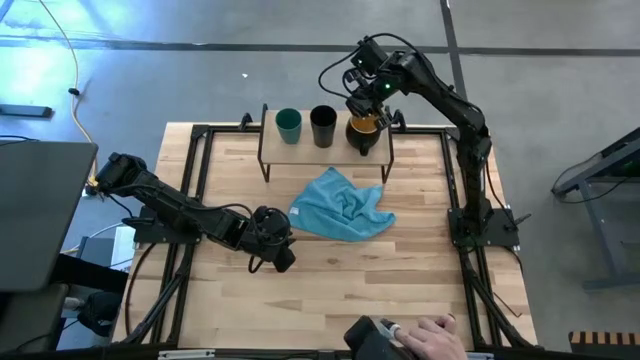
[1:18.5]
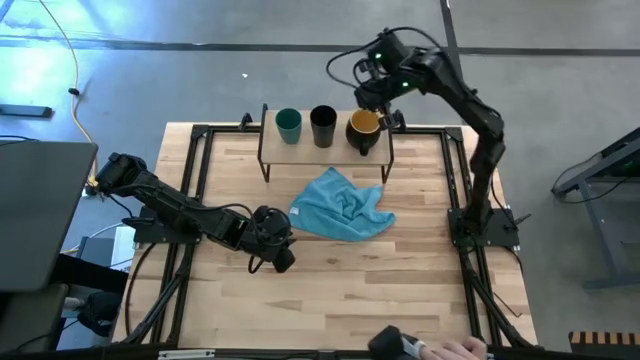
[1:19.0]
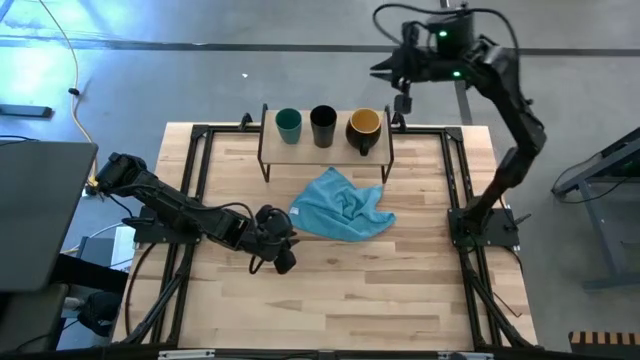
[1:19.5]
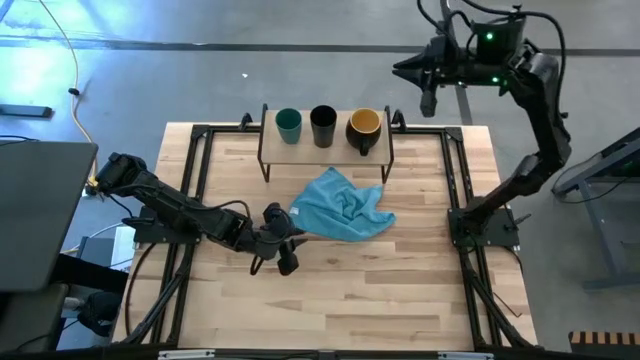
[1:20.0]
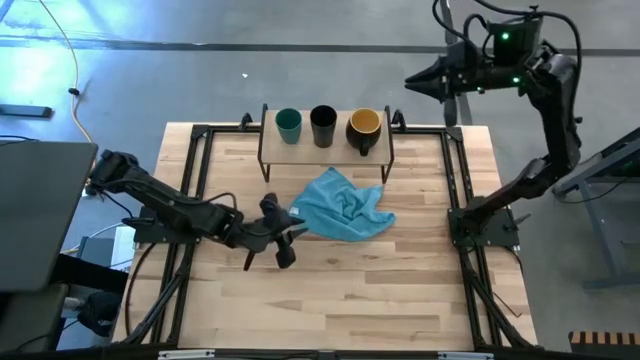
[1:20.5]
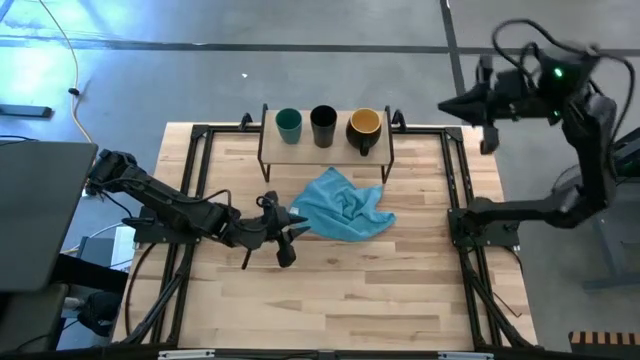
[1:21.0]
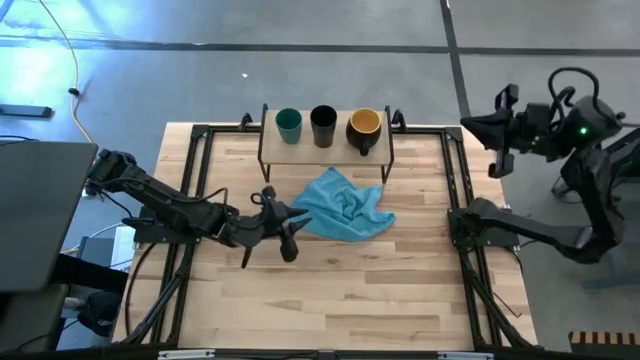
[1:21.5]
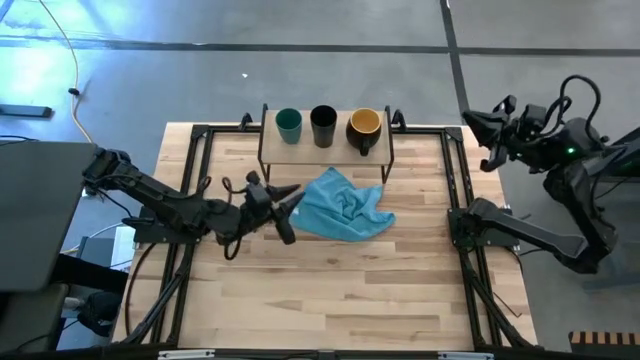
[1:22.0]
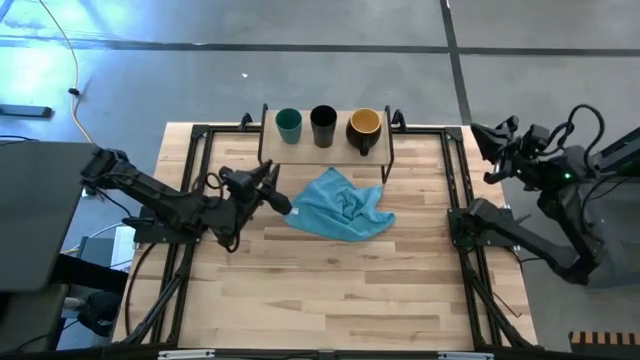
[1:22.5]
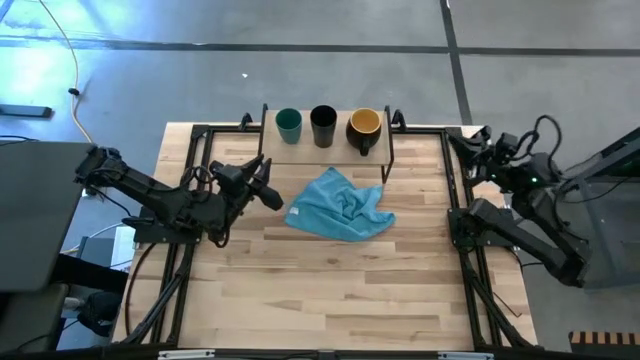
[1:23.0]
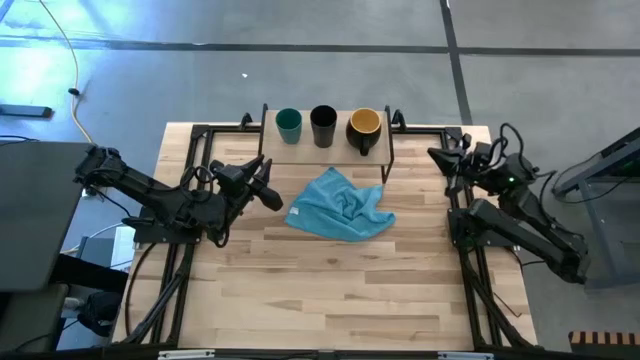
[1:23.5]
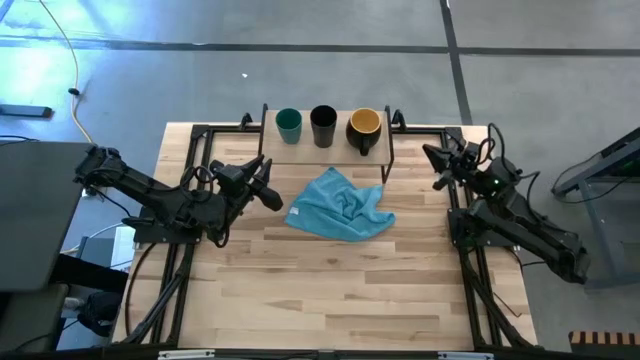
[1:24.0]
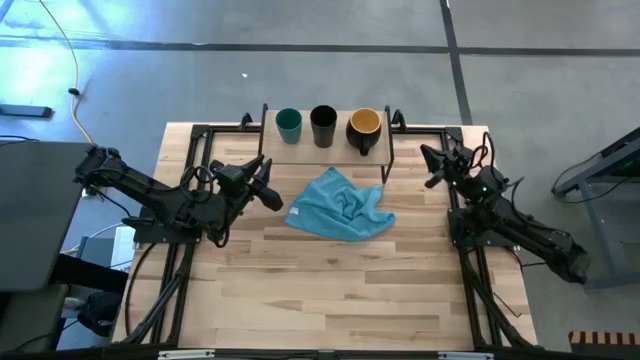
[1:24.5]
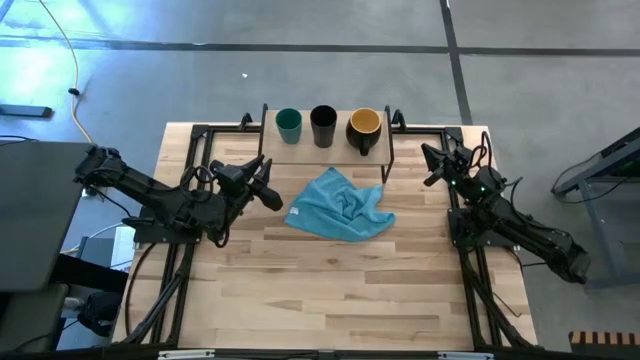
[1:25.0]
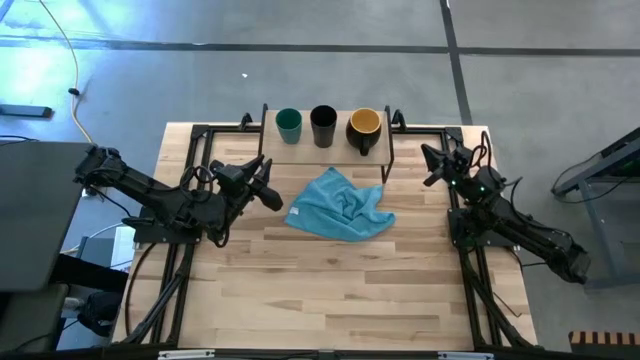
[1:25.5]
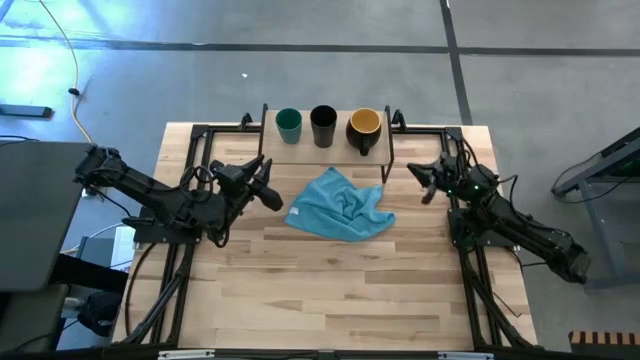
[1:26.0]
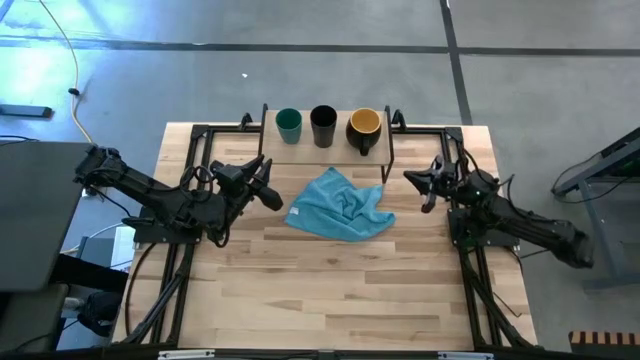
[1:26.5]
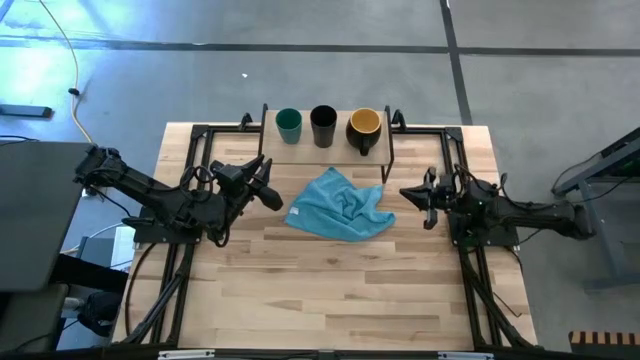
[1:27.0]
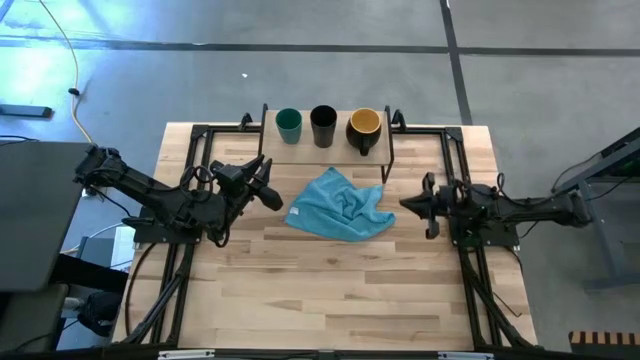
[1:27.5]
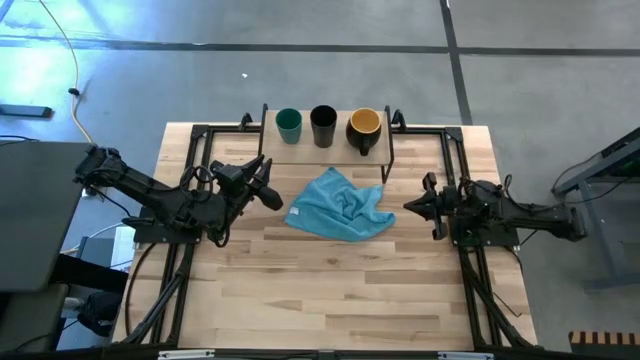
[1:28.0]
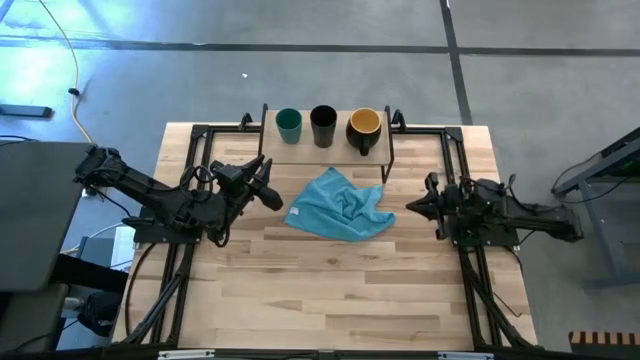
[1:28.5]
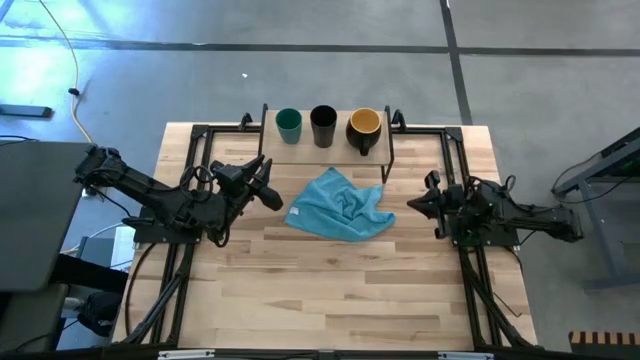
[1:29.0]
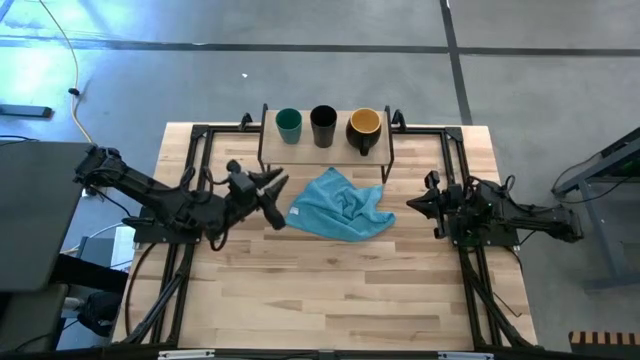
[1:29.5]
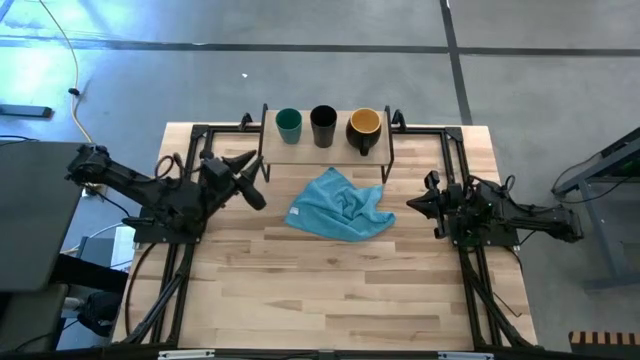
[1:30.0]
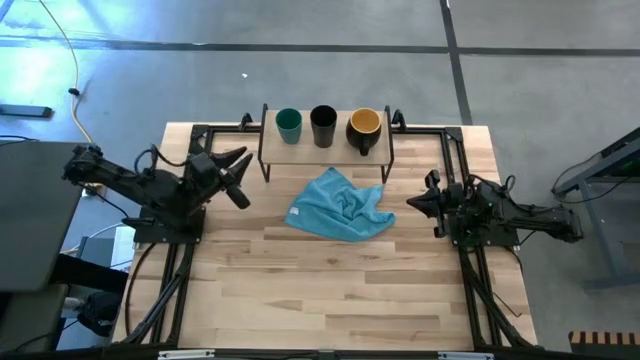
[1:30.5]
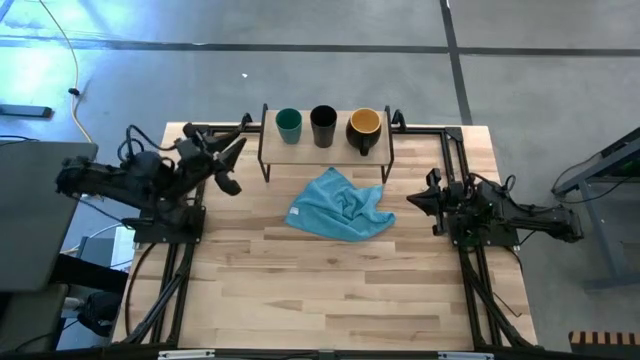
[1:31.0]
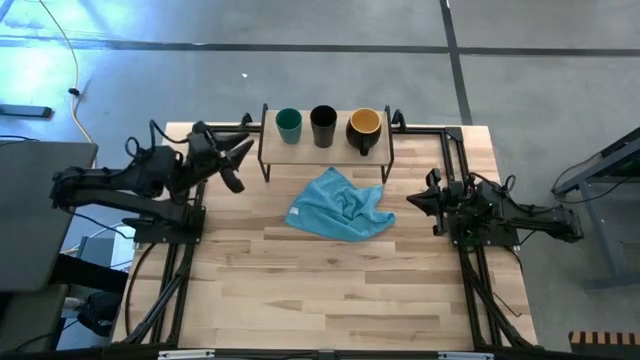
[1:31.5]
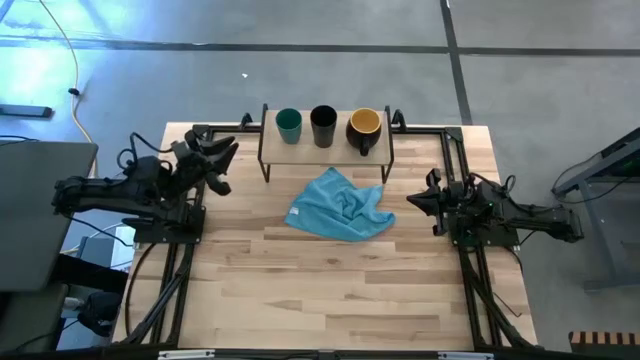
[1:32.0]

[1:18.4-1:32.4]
Task: Stack small to large cups/mugs on shelf
Return to Home Position

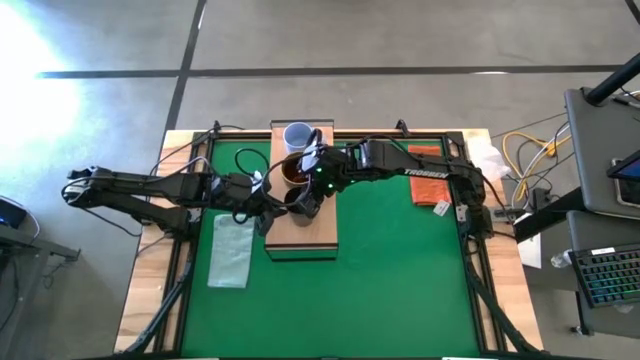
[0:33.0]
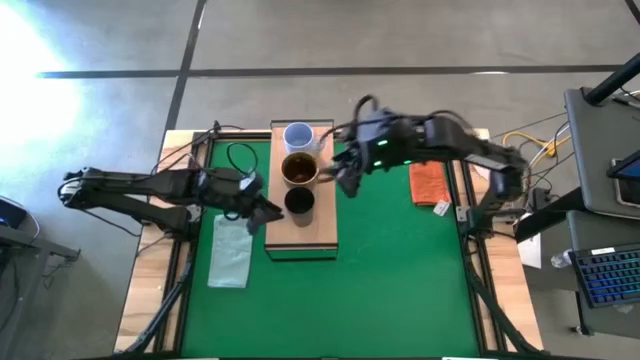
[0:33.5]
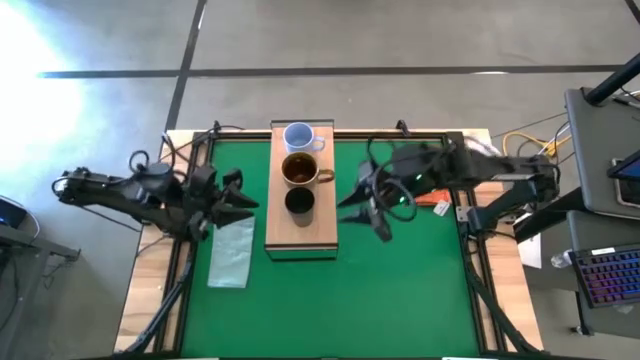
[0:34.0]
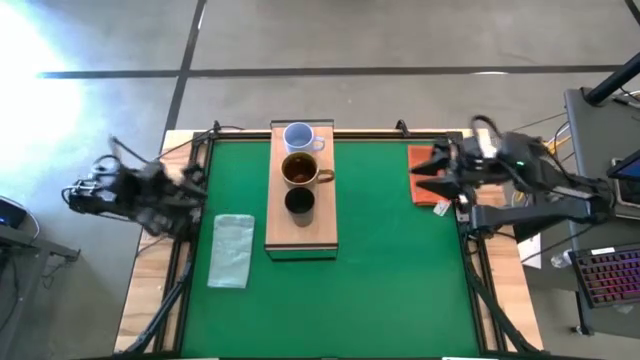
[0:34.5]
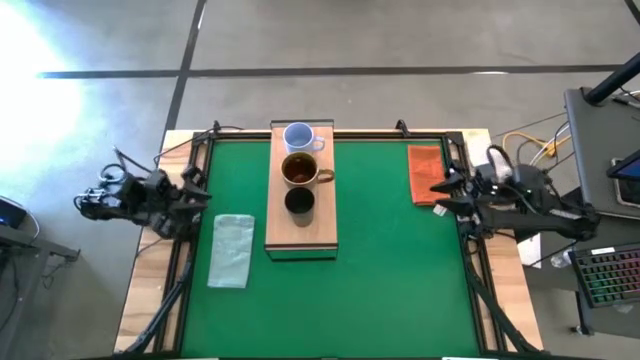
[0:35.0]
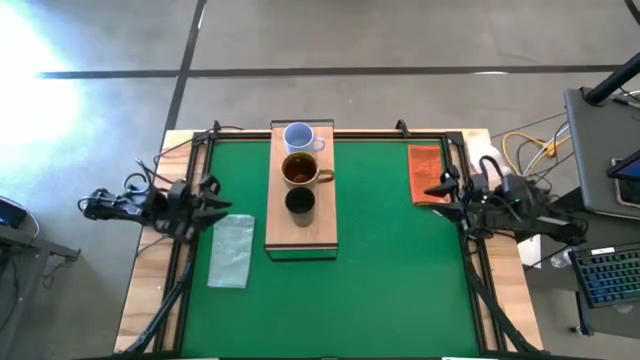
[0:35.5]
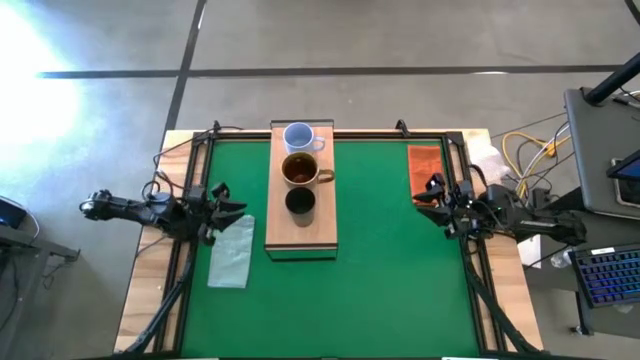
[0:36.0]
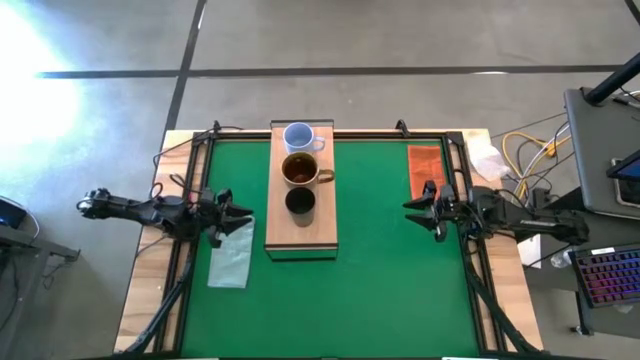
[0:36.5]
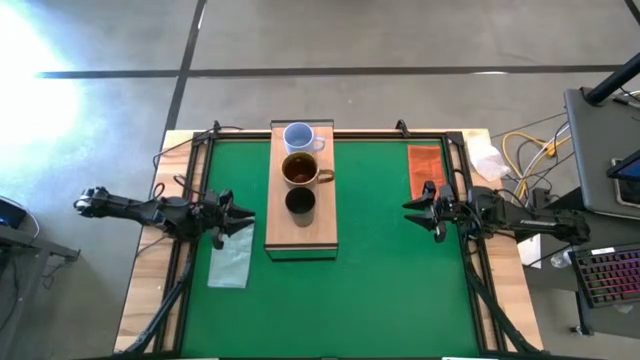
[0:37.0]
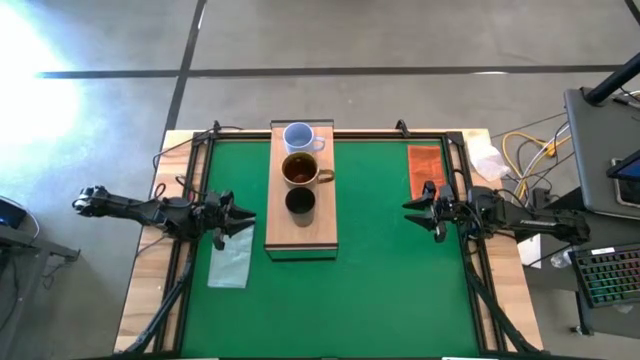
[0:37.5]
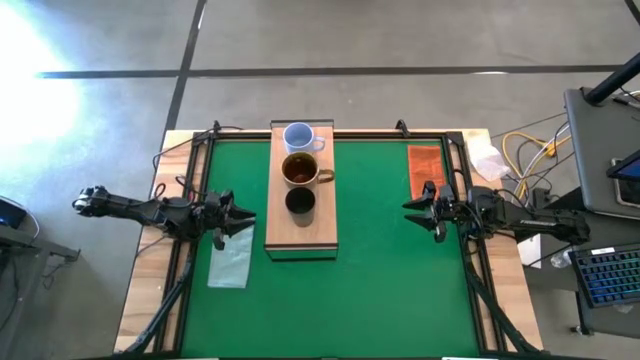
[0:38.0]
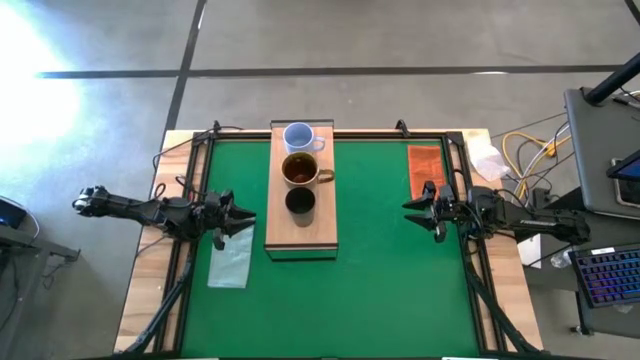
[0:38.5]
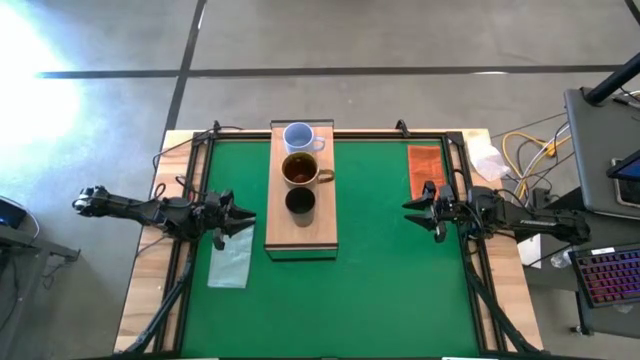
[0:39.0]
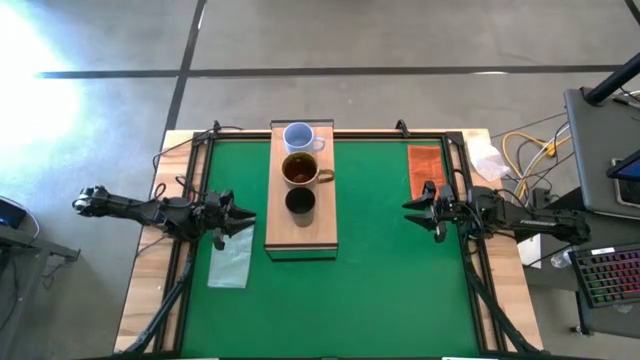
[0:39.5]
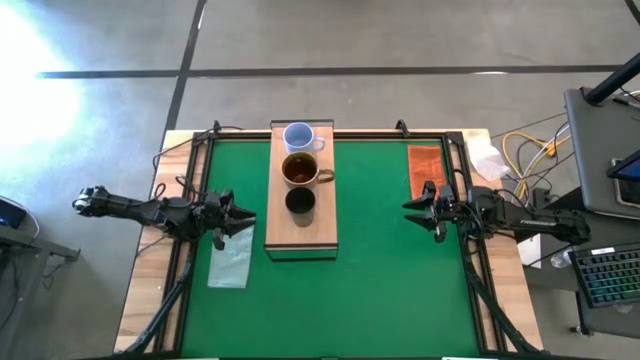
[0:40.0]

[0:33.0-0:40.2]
Task: Stack small to large cups/mugs on shelf
Return to Home Position
